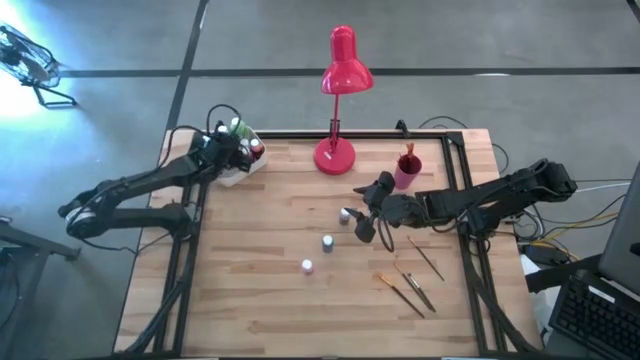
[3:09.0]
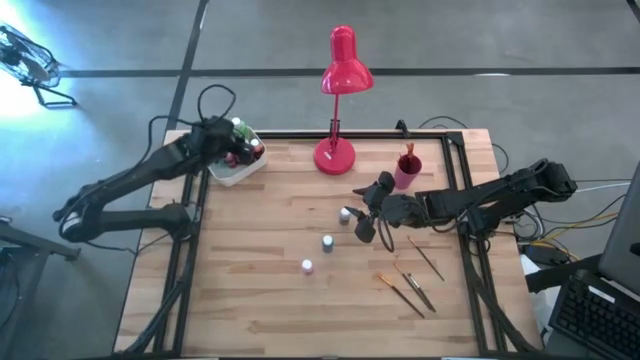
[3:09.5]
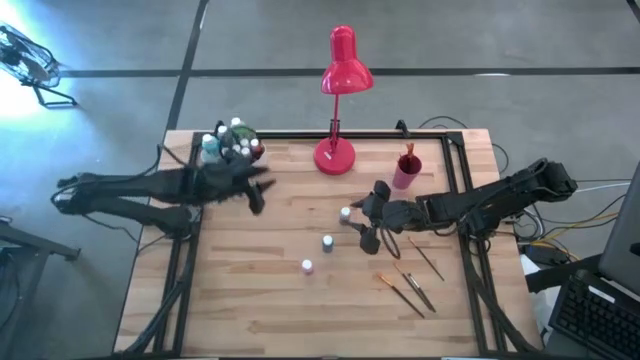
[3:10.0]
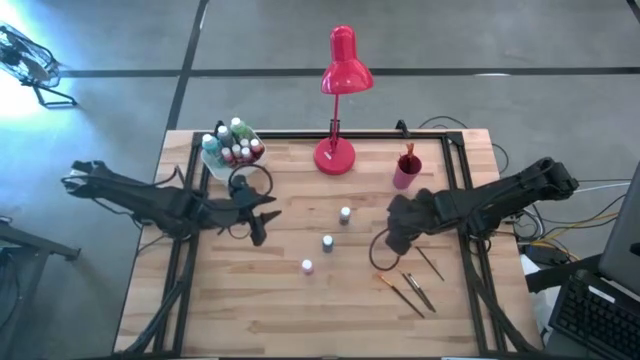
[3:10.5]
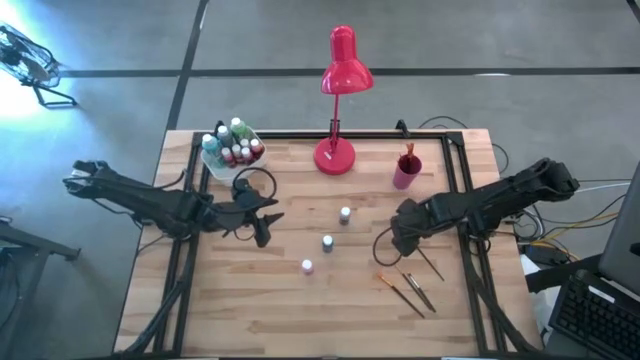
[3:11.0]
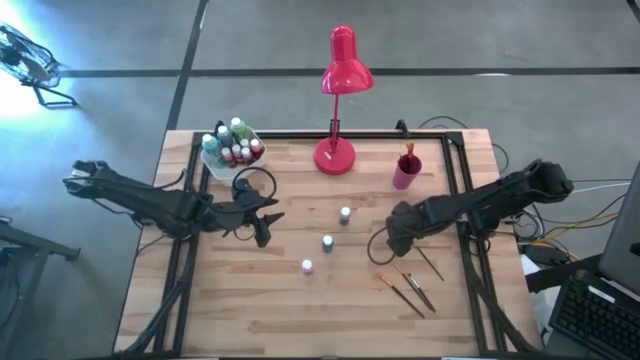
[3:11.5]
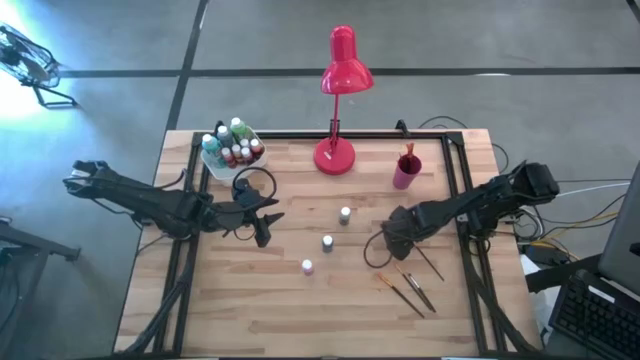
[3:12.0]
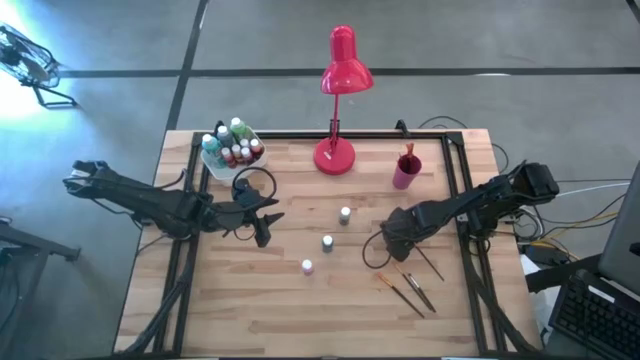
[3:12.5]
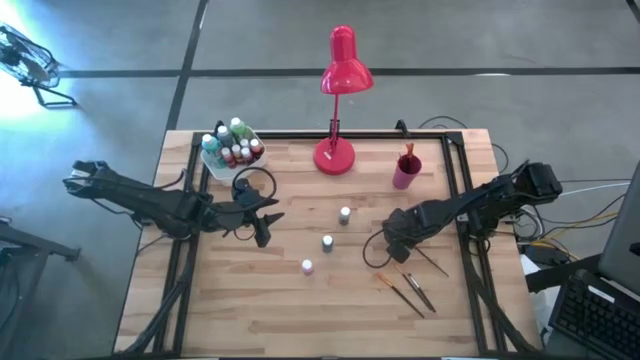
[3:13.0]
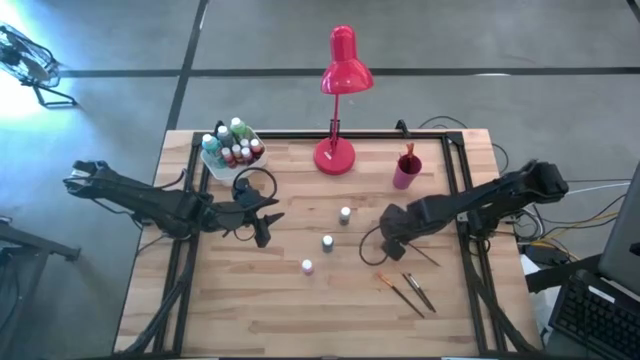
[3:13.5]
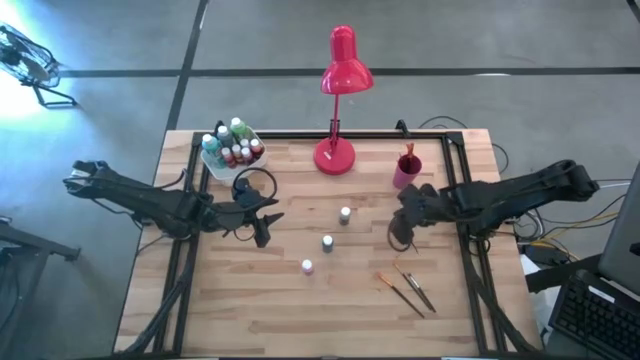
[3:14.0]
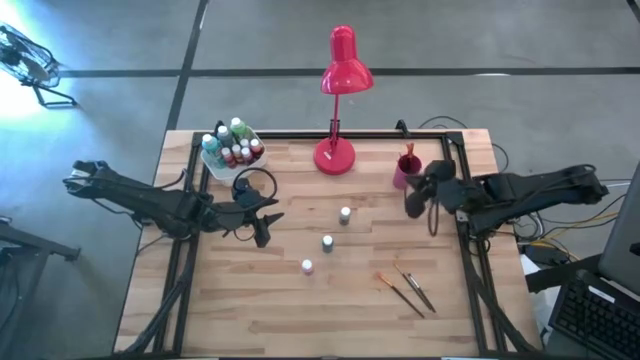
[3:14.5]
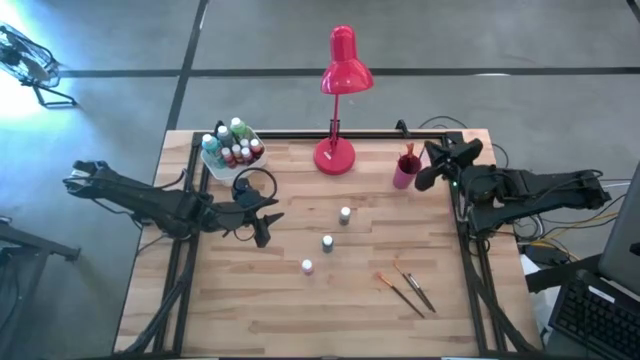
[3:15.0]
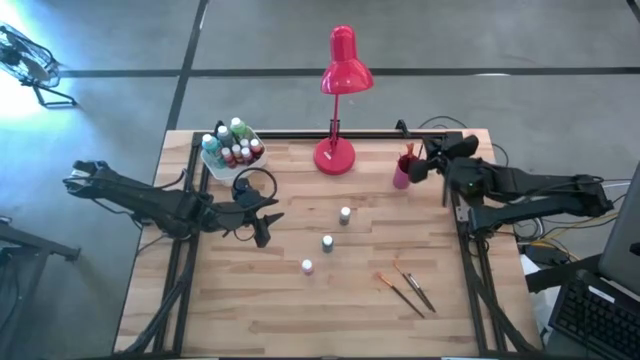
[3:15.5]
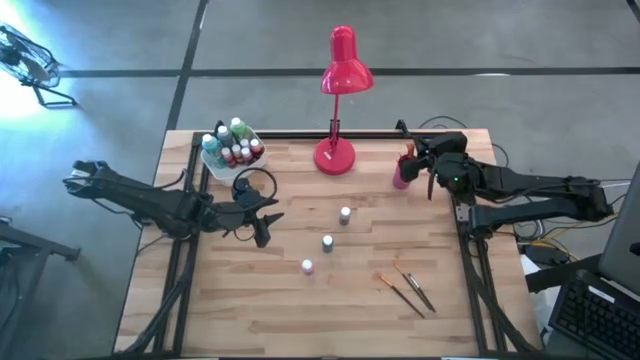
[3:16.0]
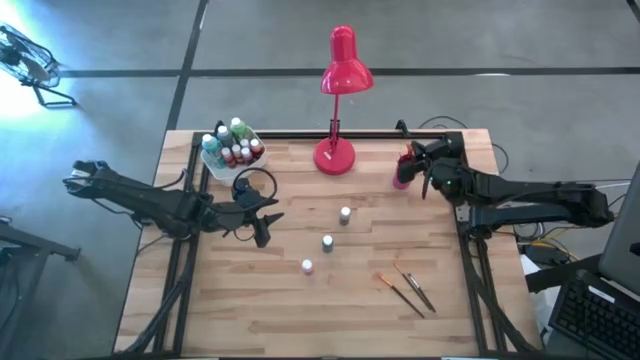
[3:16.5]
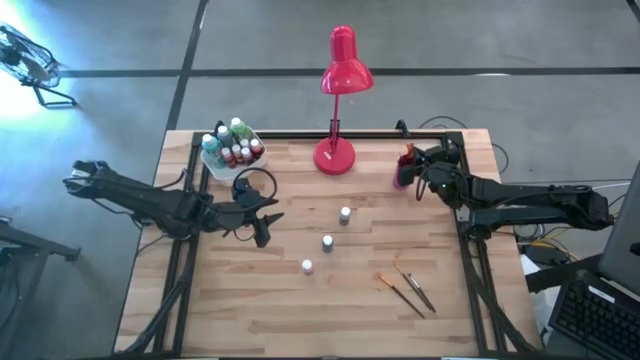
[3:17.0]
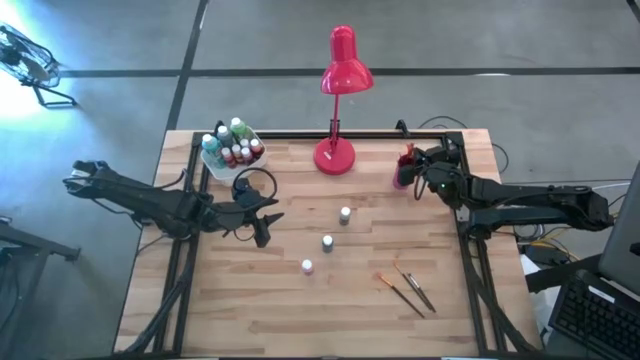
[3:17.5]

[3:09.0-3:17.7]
Task: Pick & Place Paint Supplies
Put the gold paintbrush into the pink cup

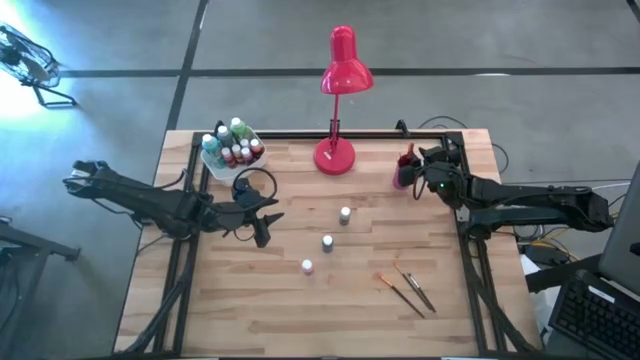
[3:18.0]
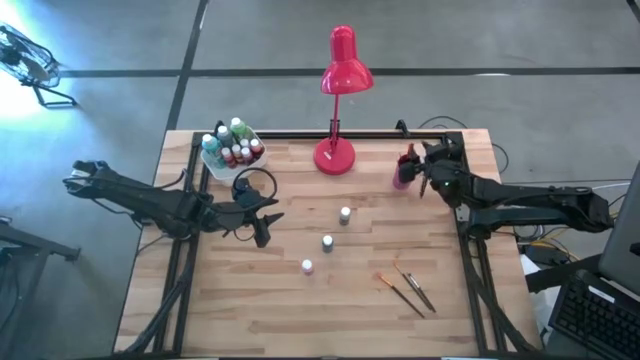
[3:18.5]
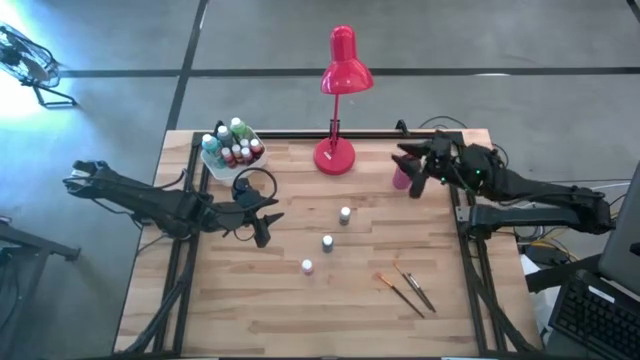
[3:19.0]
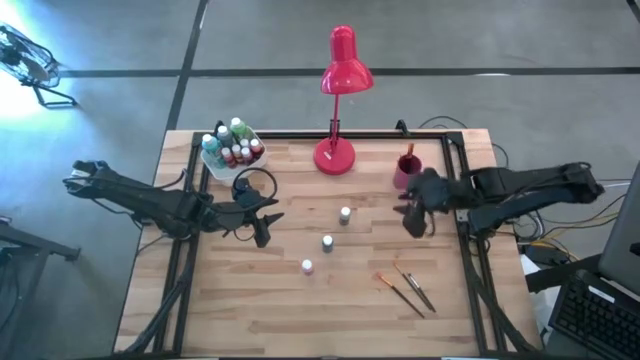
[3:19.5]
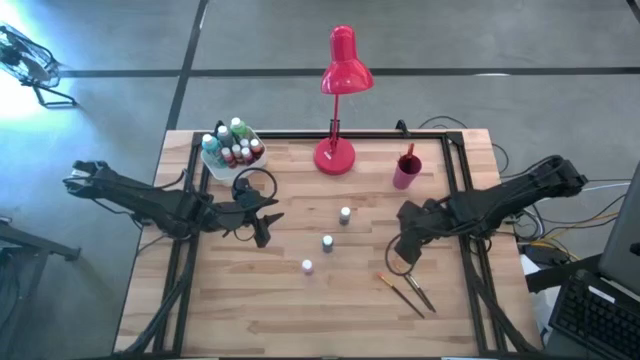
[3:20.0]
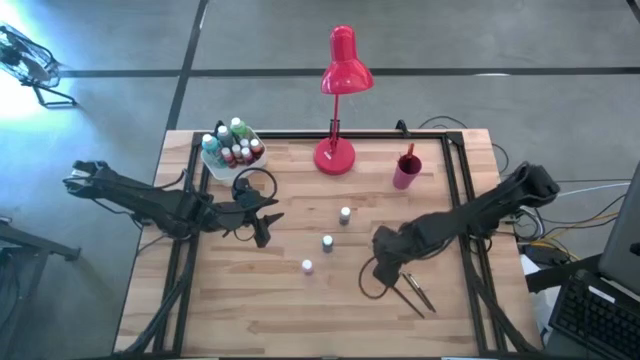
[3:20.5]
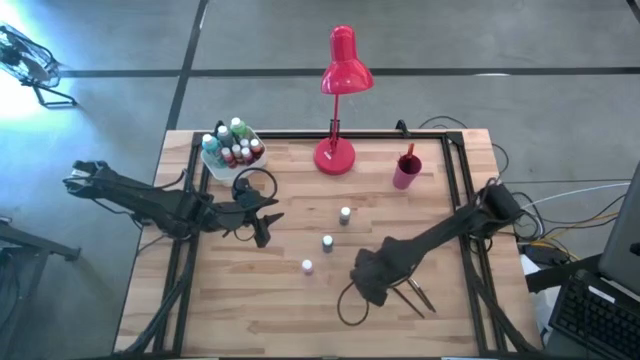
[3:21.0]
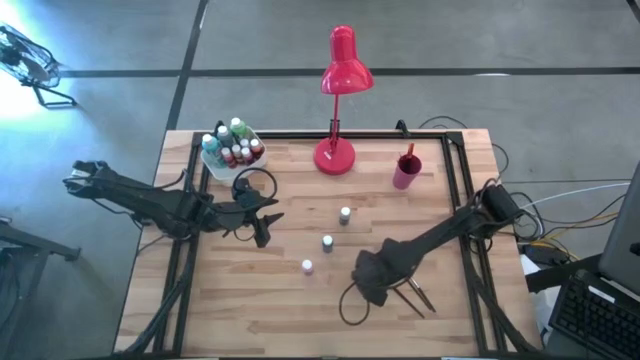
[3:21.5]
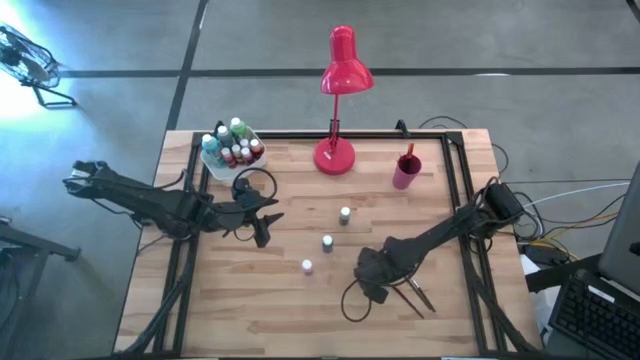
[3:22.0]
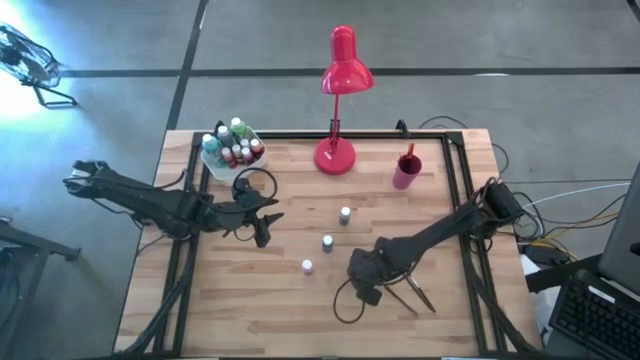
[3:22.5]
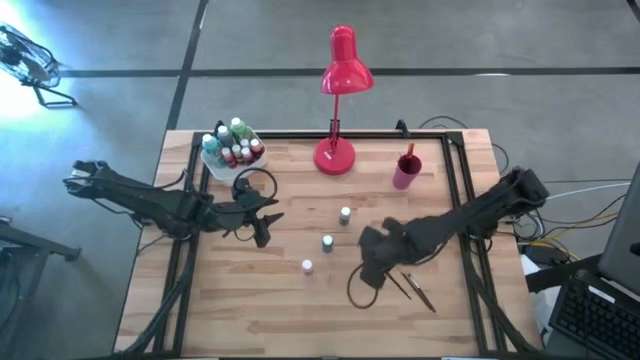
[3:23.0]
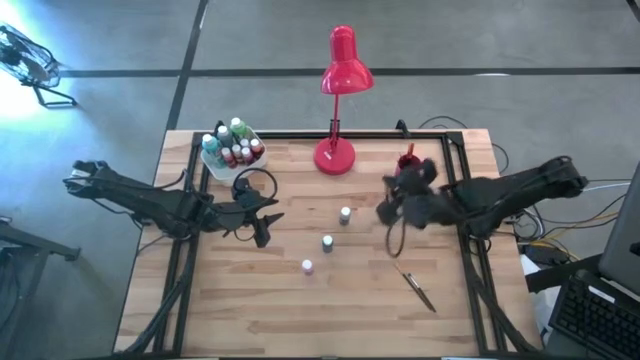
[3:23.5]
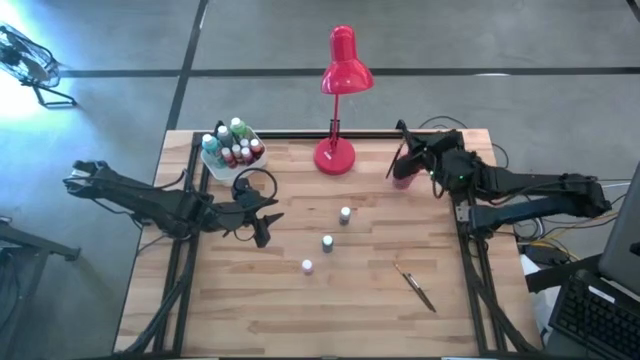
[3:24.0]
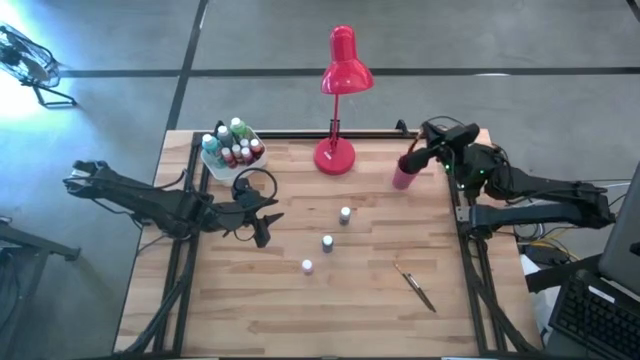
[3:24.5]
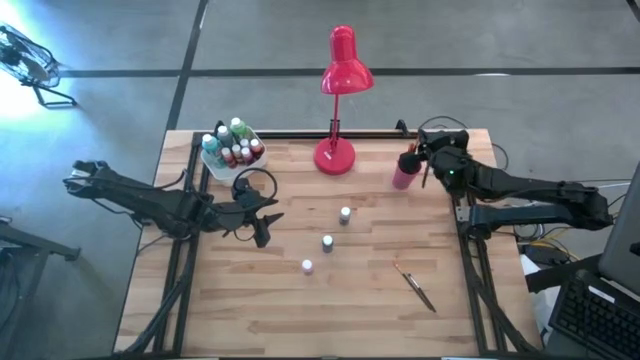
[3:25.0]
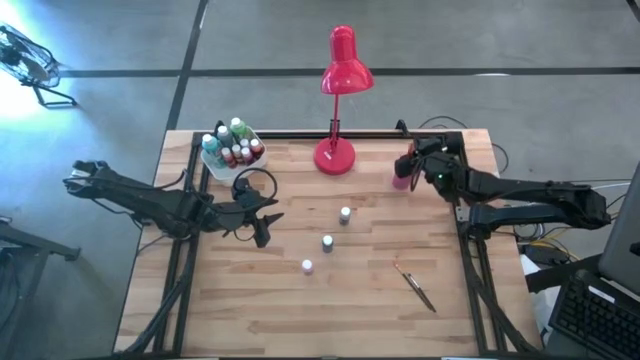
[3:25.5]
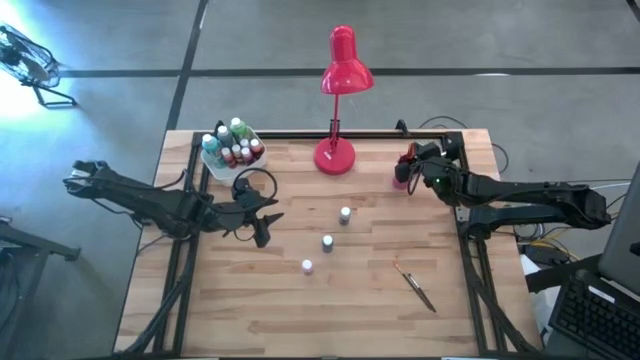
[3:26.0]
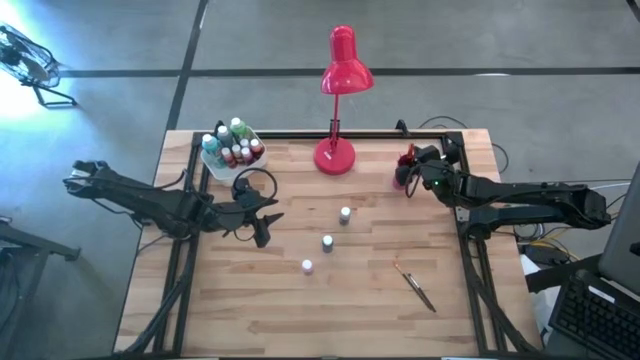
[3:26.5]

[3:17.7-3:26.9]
Put the gold paintbrush into the pink cup
